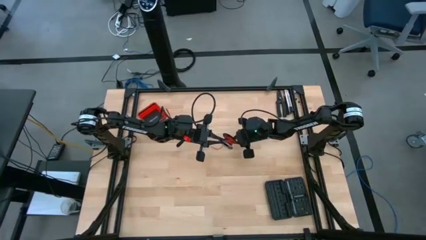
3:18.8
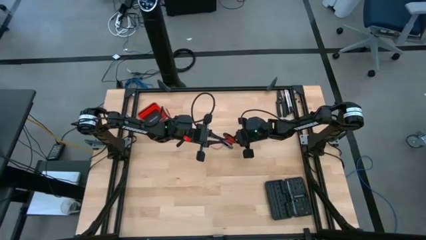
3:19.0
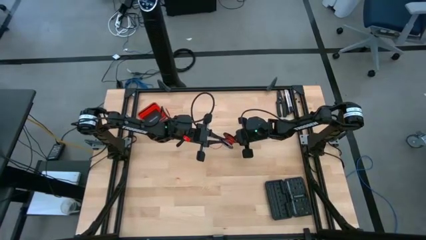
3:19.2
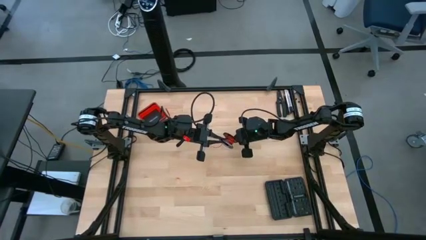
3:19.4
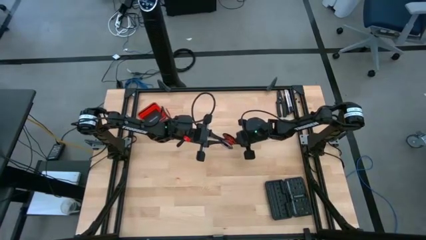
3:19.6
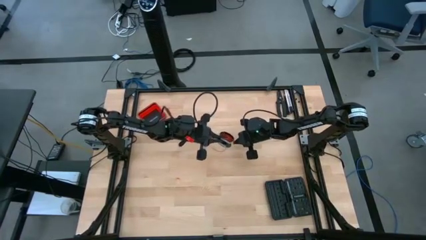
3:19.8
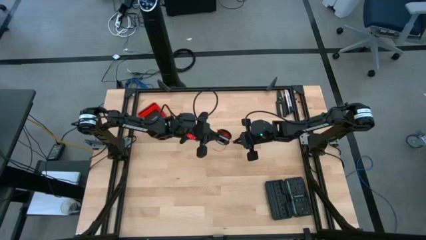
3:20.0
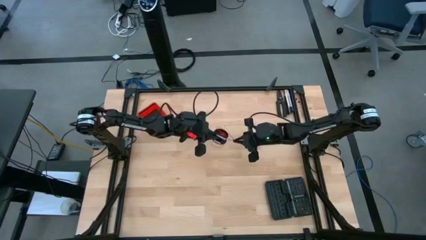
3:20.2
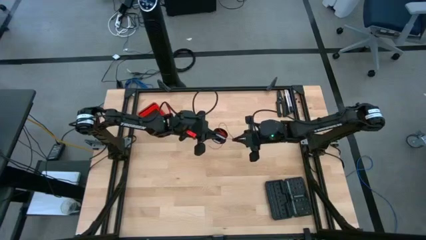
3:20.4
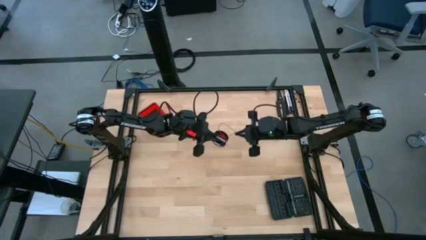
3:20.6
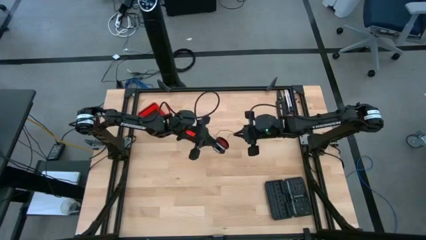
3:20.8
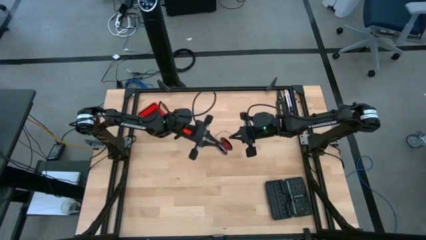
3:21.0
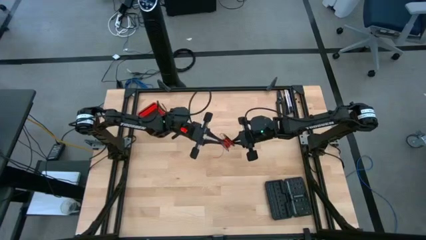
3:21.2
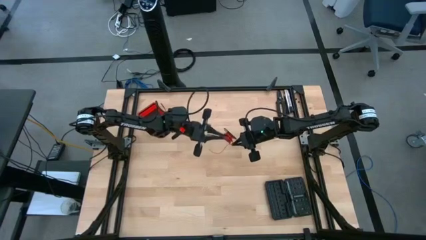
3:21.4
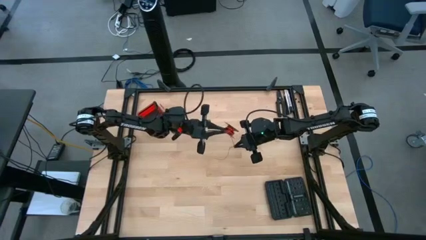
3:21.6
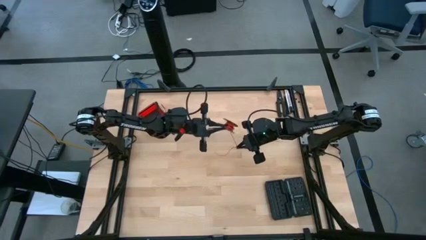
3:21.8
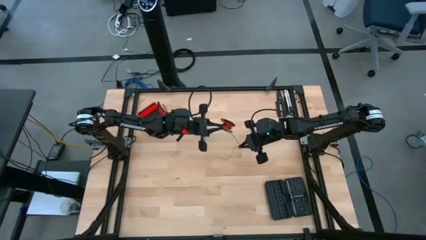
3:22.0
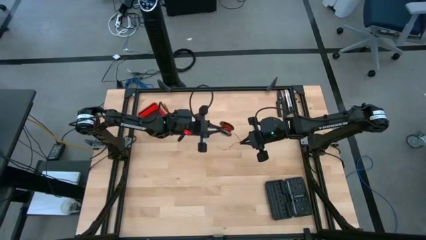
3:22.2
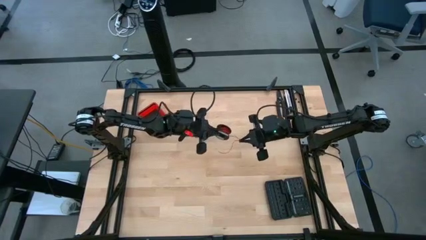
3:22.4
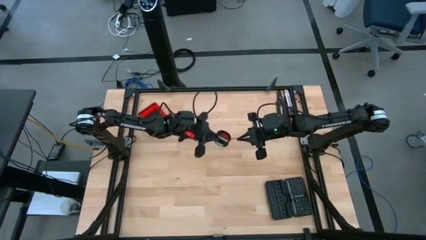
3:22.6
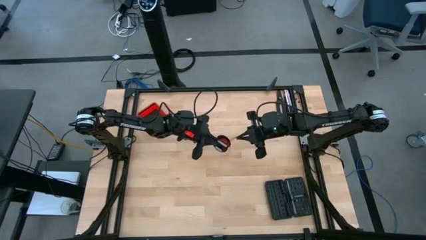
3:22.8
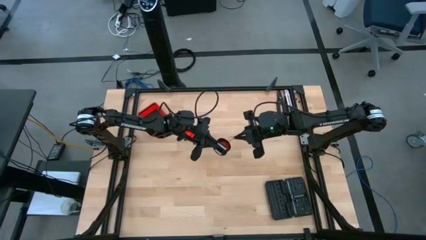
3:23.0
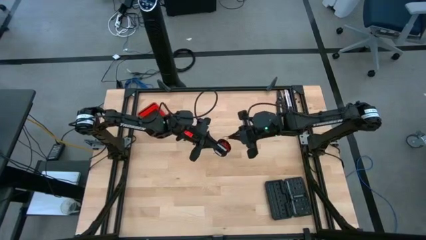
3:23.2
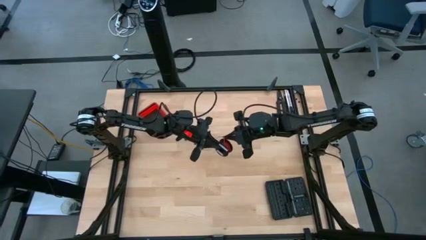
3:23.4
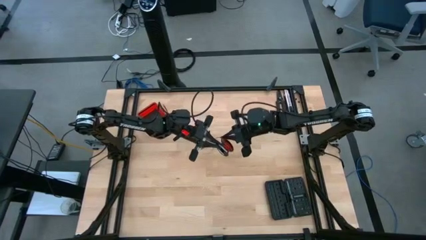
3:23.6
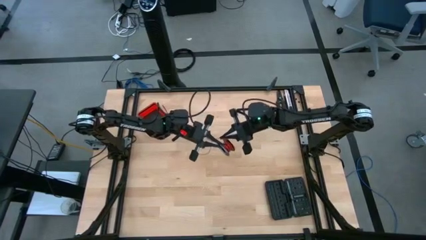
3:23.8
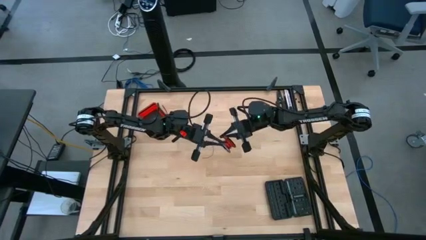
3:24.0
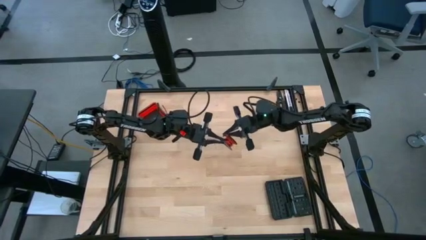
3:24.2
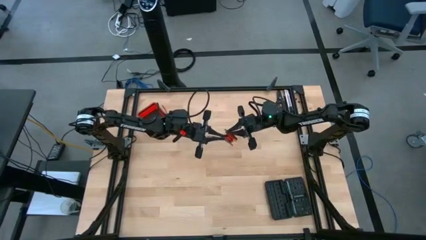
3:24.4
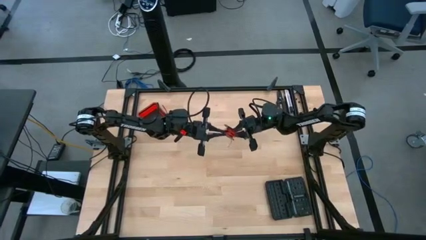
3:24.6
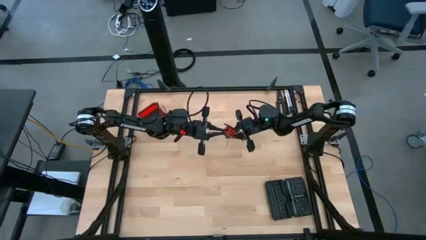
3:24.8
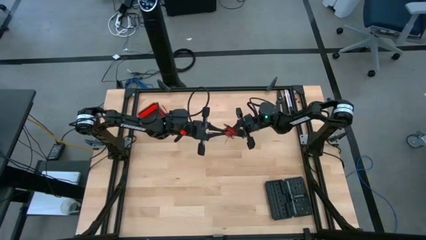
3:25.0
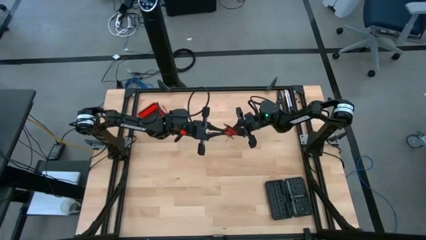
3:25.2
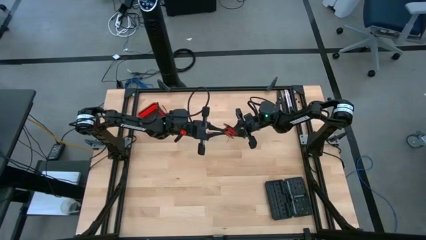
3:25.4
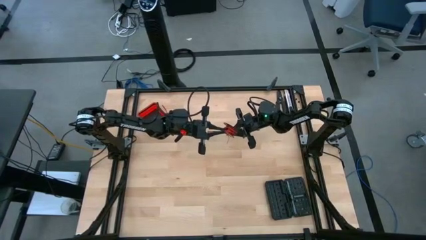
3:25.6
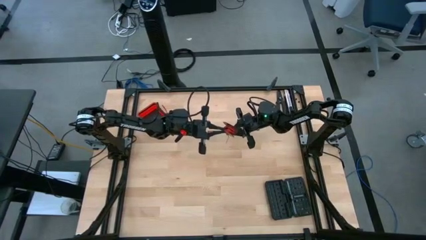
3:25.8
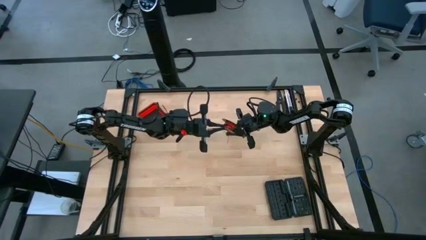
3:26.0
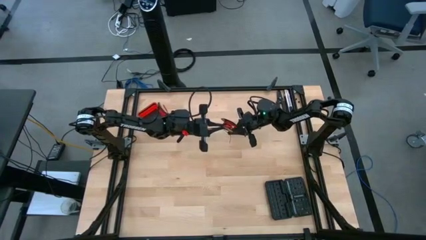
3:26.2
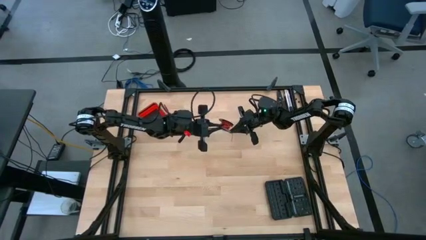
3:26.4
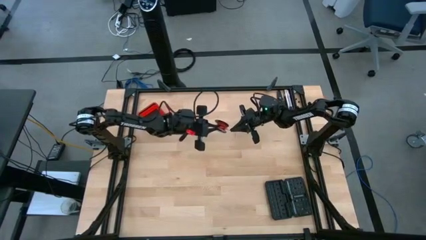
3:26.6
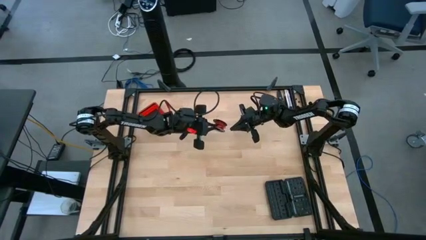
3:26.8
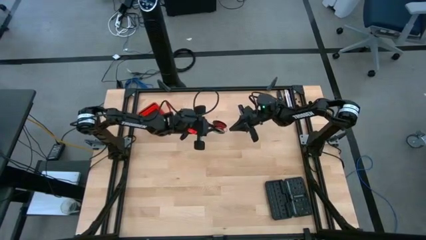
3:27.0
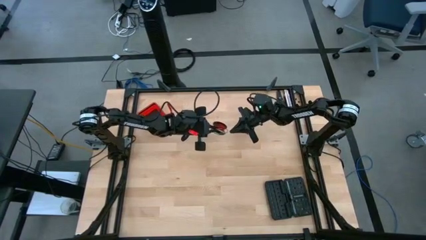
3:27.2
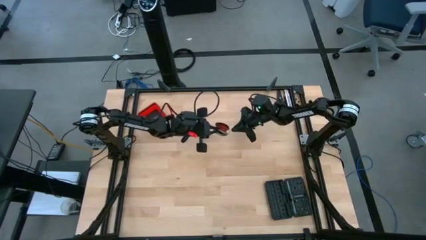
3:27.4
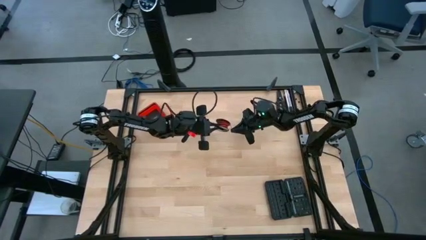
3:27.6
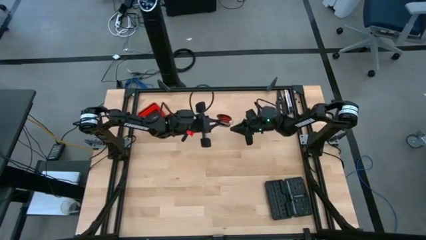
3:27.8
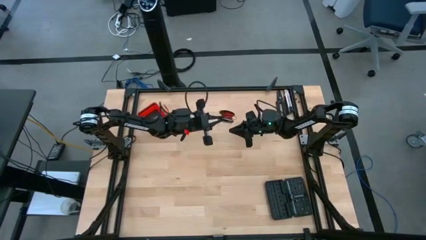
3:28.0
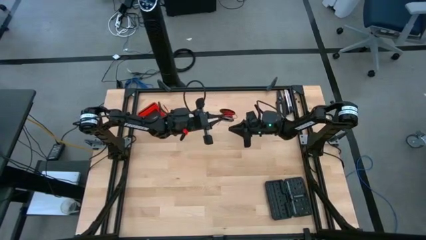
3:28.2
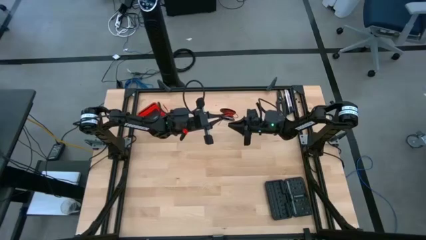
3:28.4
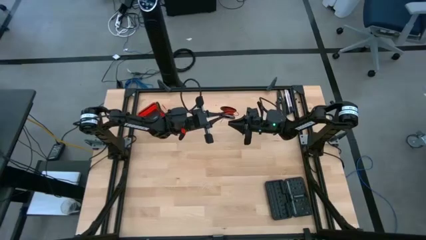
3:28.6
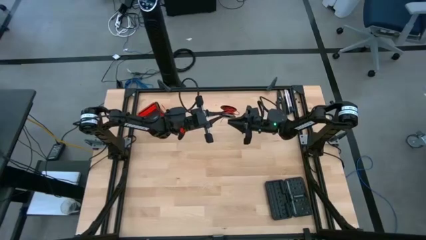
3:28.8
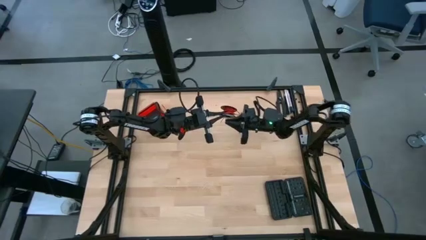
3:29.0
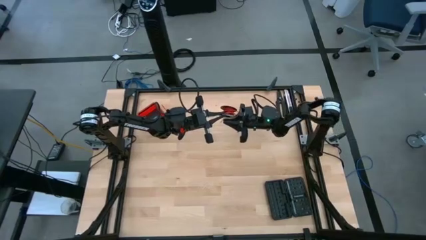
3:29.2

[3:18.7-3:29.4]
Task: Coil cords
Coil the wire to the spool

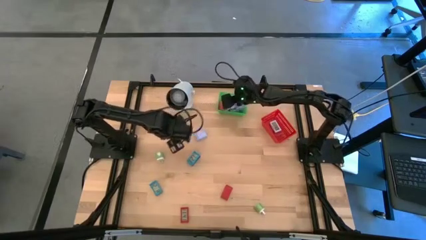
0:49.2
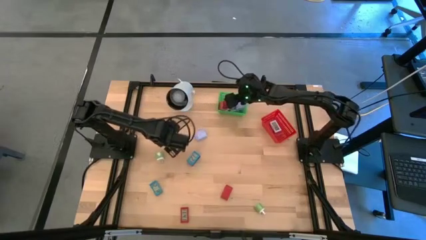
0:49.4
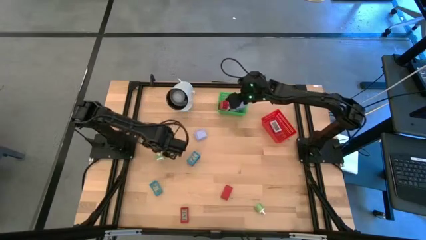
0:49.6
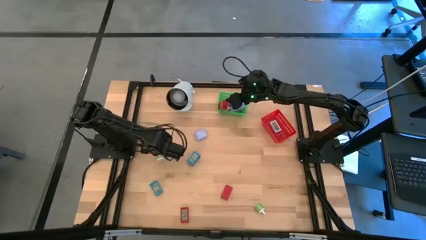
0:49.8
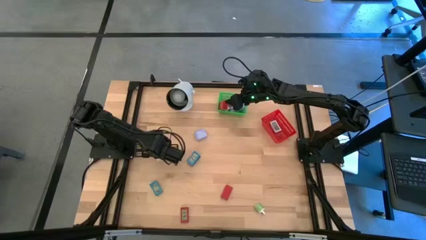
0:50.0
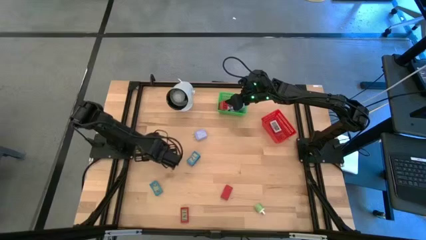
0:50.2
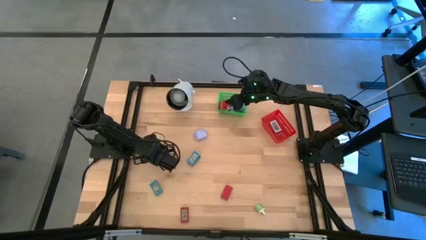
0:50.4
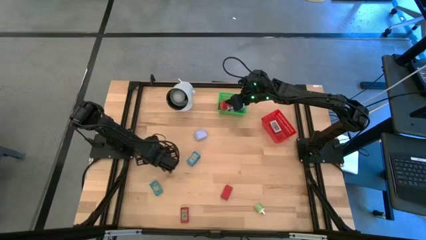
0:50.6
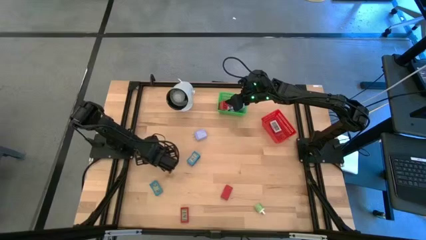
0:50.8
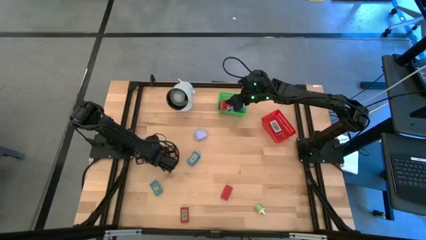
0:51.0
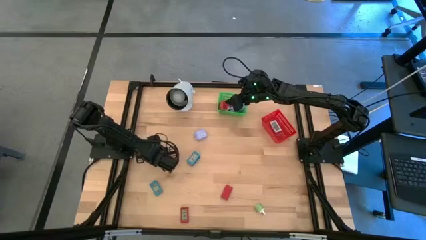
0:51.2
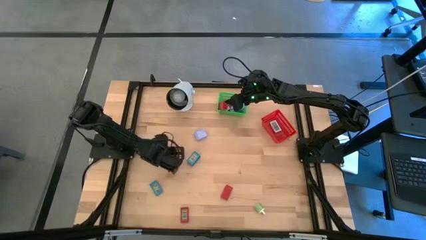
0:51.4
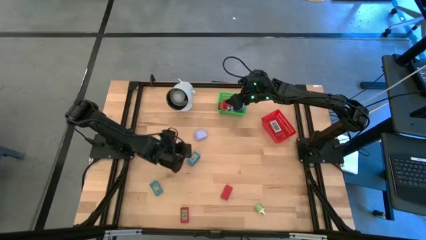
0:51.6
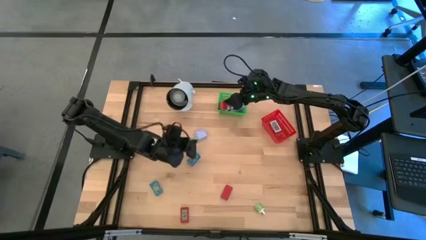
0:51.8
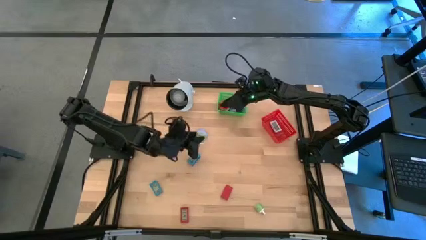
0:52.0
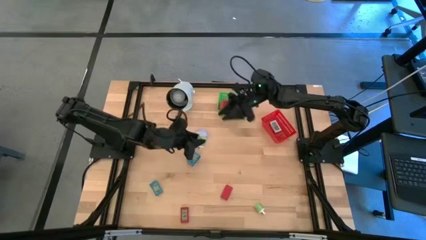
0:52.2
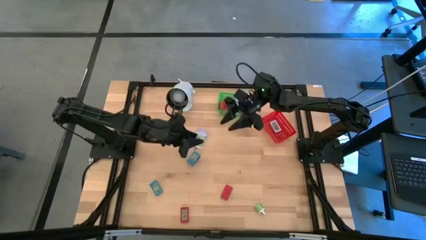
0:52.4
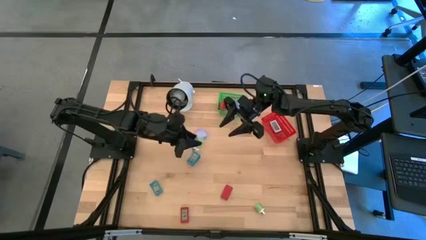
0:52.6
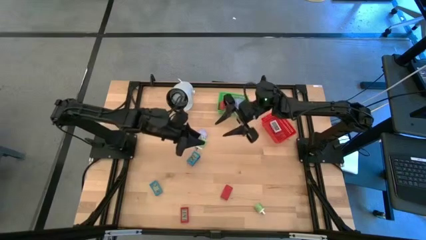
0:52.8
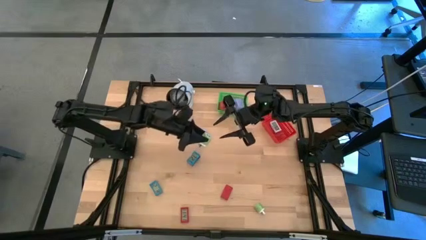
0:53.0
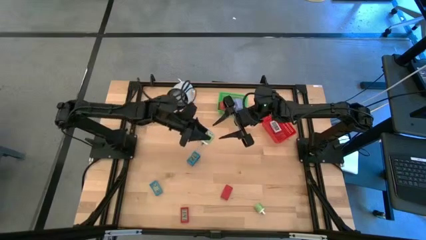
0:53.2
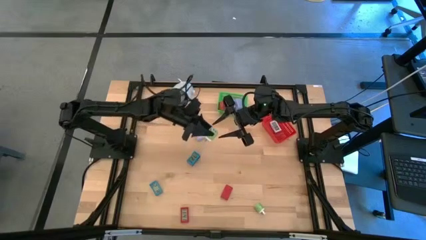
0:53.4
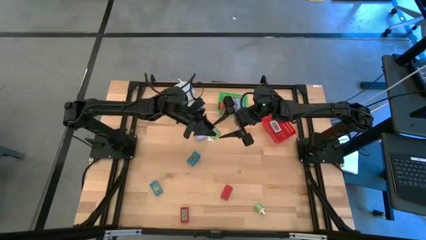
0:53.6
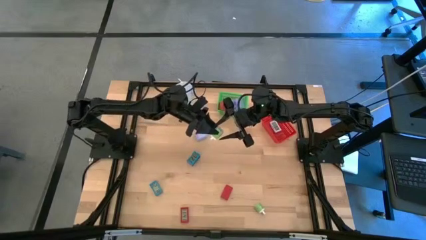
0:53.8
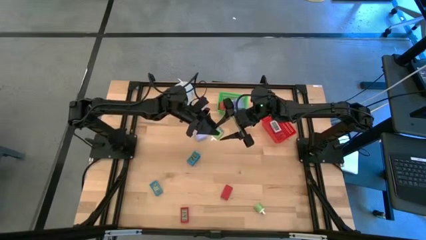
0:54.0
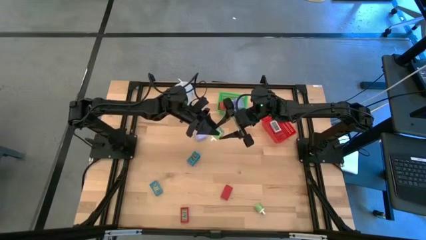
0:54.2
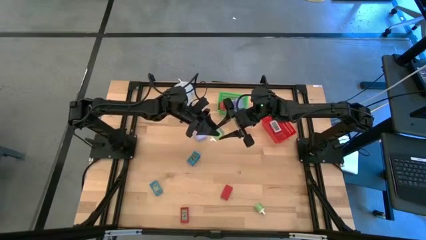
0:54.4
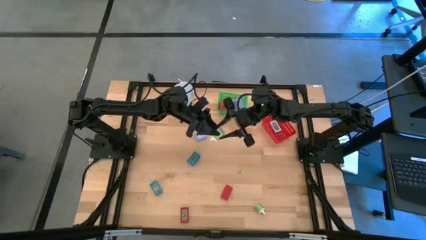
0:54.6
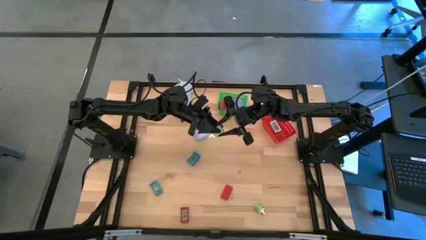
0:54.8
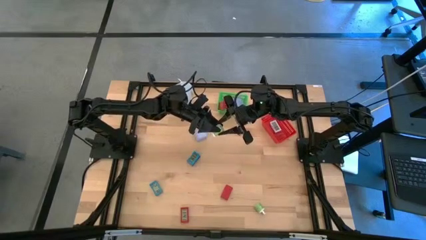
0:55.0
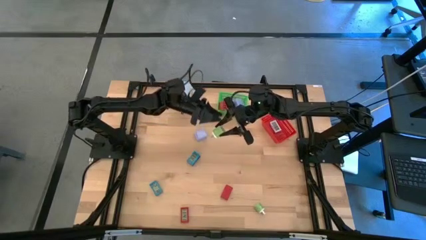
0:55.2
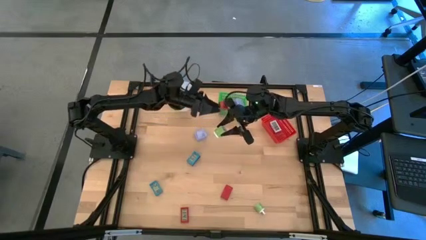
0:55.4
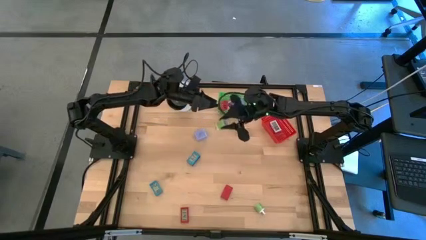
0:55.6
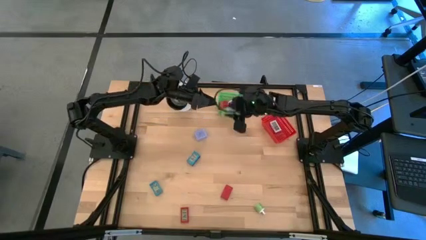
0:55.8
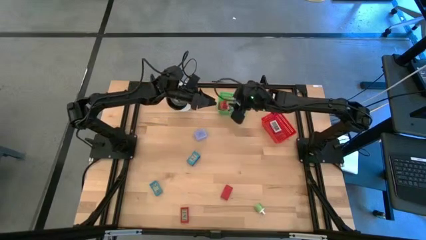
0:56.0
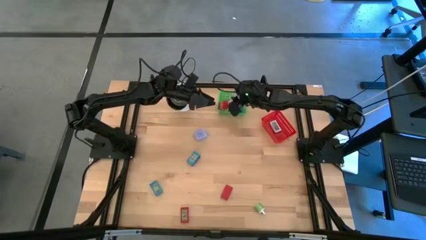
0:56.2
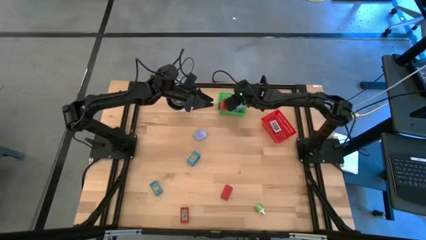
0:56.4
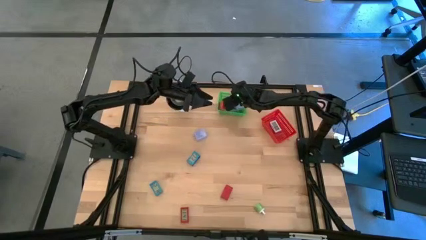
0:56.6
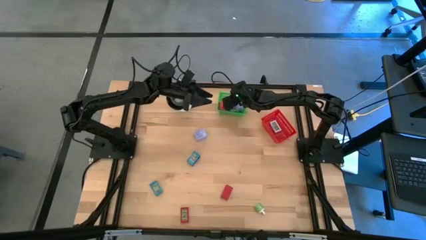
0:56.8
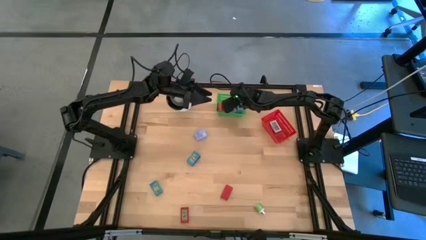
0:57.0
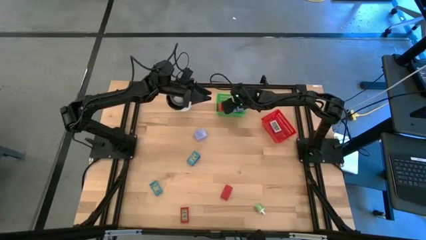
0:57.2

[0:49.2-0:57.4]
Task: Pick & Place Office items
Put the top green charger adapter into the green bin
